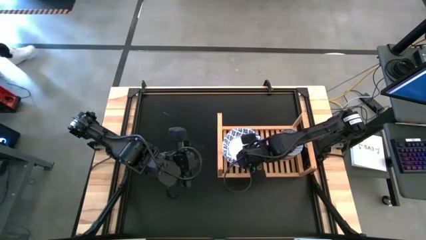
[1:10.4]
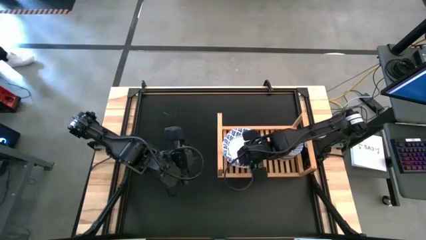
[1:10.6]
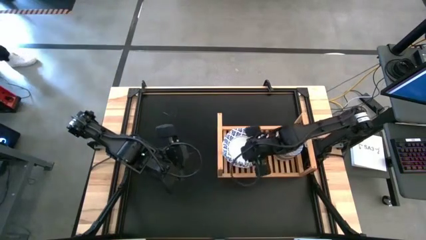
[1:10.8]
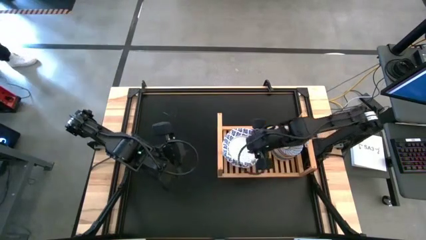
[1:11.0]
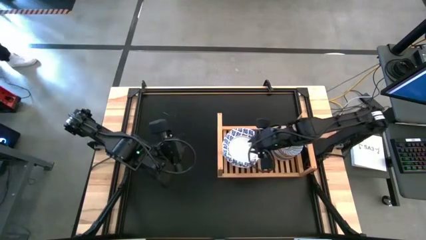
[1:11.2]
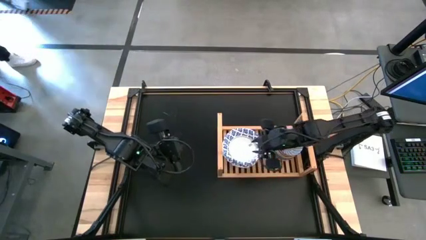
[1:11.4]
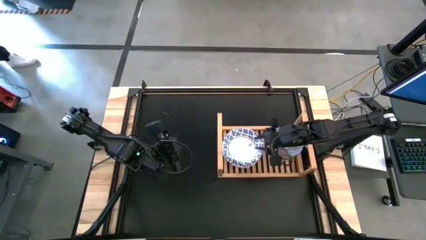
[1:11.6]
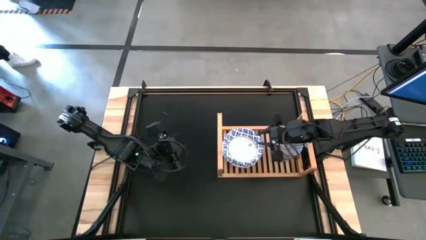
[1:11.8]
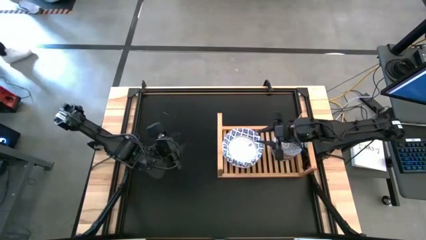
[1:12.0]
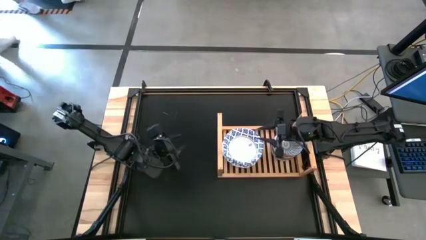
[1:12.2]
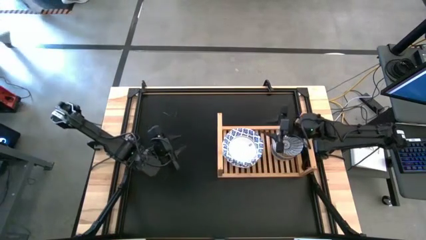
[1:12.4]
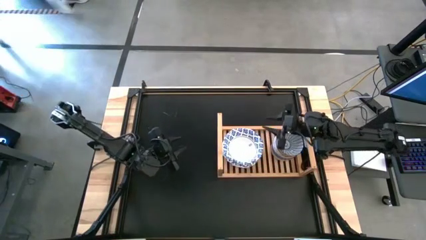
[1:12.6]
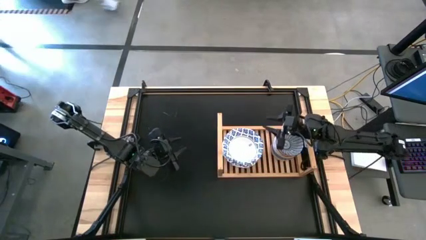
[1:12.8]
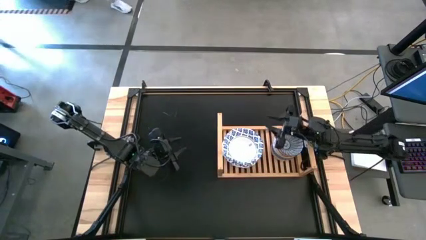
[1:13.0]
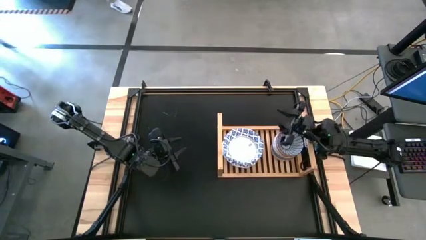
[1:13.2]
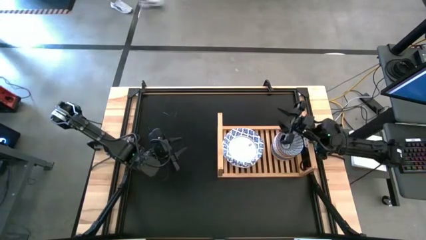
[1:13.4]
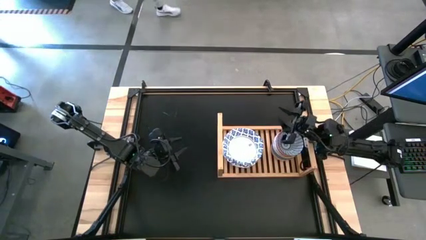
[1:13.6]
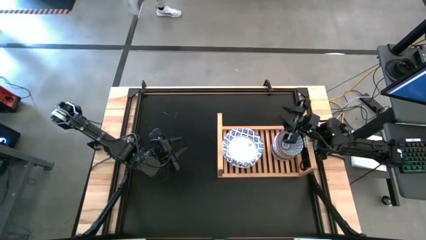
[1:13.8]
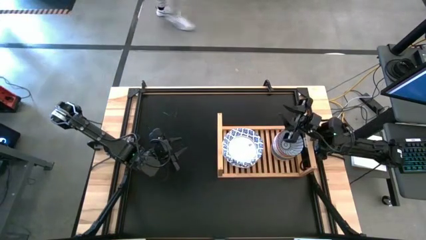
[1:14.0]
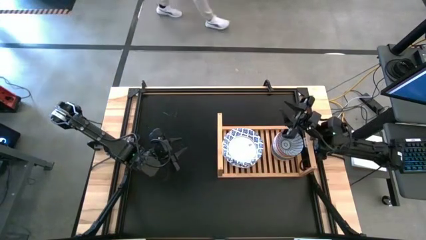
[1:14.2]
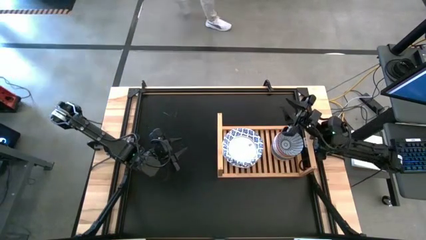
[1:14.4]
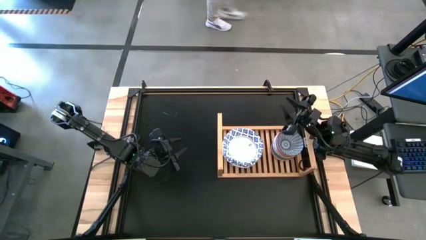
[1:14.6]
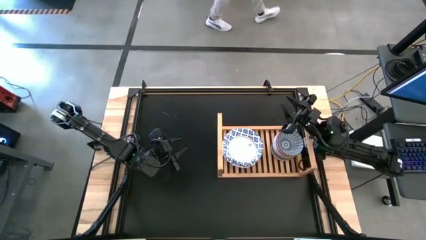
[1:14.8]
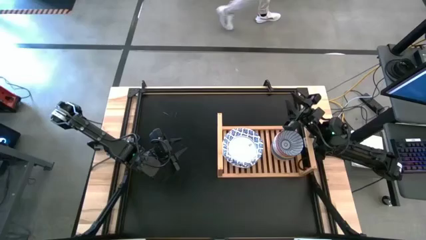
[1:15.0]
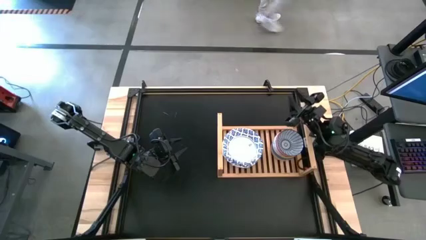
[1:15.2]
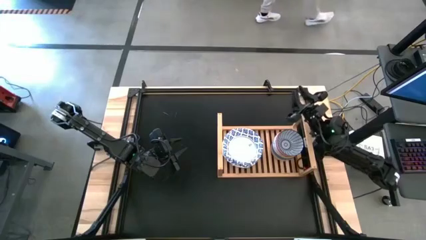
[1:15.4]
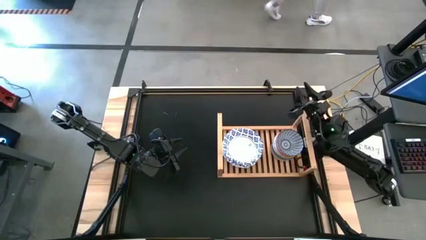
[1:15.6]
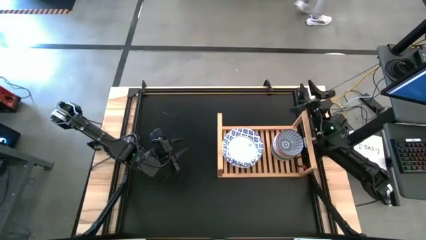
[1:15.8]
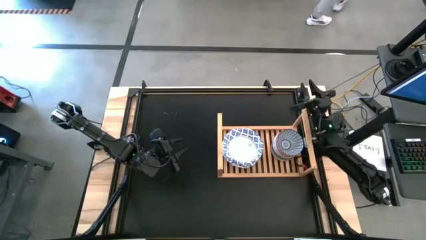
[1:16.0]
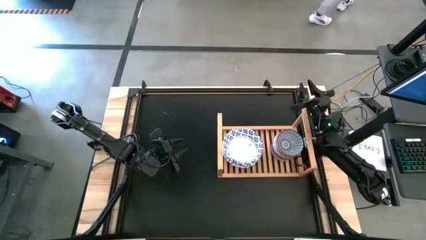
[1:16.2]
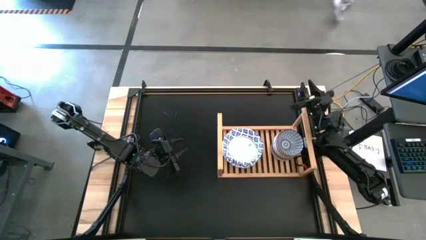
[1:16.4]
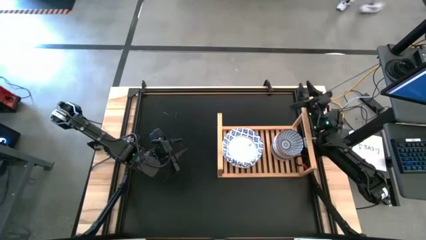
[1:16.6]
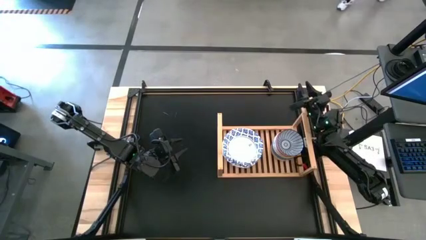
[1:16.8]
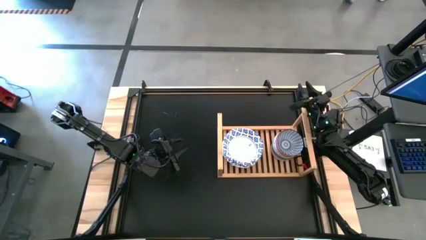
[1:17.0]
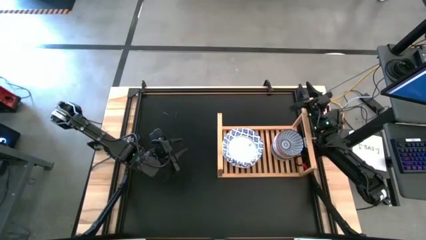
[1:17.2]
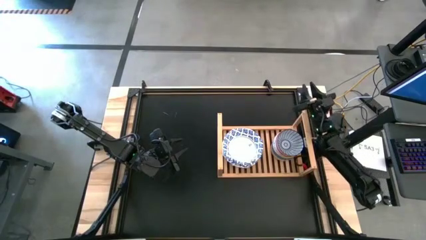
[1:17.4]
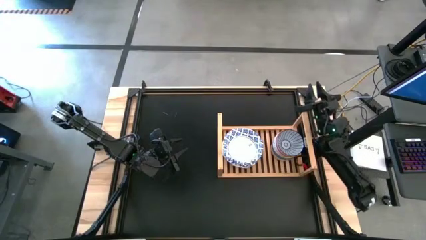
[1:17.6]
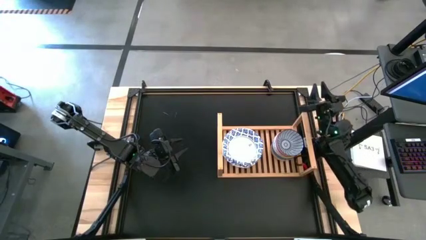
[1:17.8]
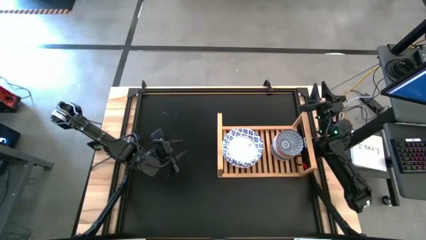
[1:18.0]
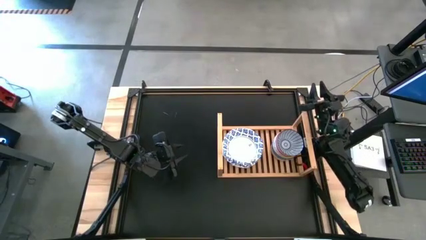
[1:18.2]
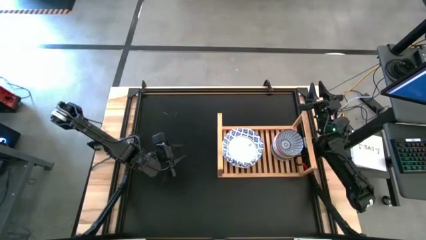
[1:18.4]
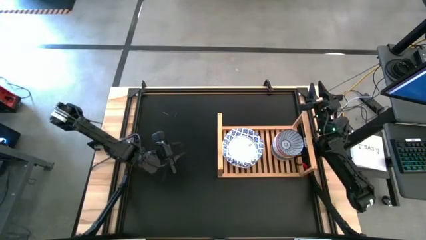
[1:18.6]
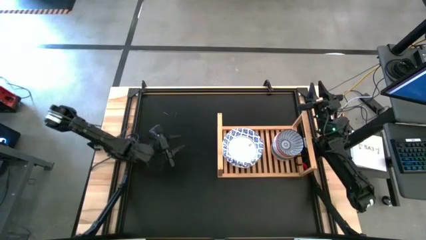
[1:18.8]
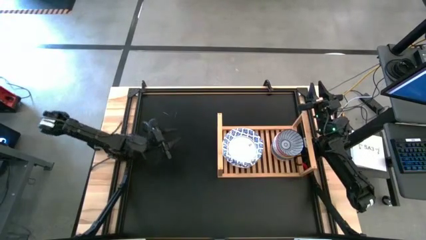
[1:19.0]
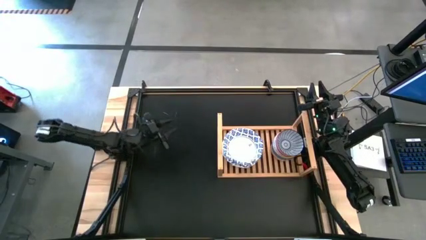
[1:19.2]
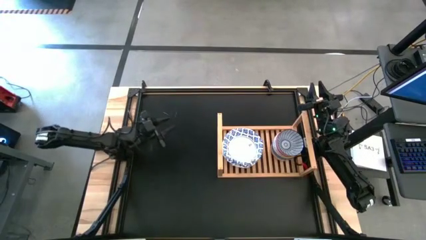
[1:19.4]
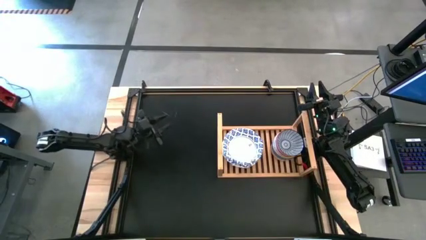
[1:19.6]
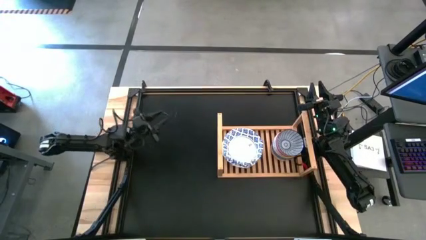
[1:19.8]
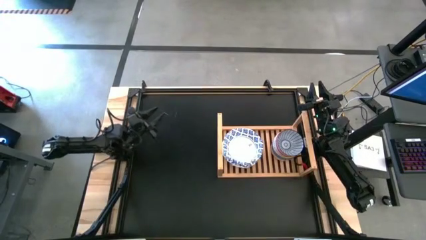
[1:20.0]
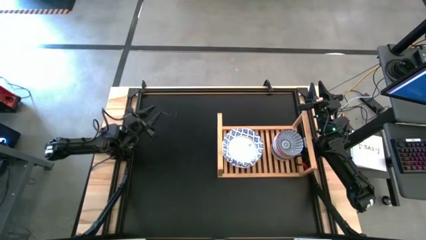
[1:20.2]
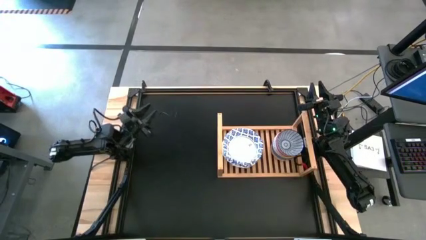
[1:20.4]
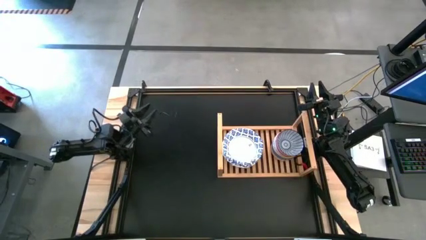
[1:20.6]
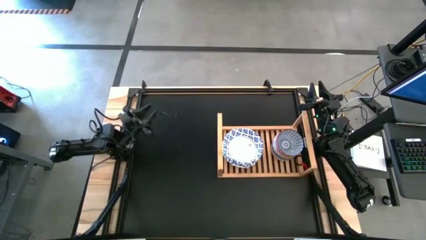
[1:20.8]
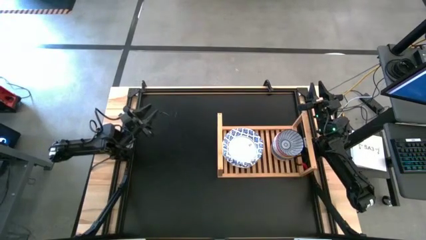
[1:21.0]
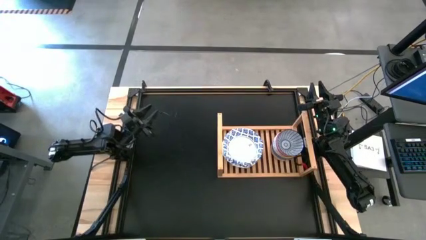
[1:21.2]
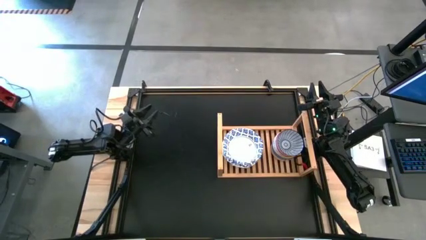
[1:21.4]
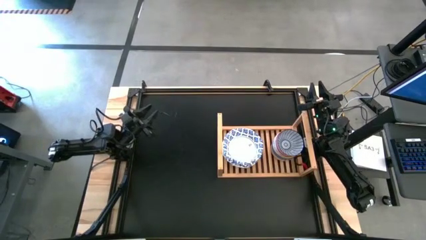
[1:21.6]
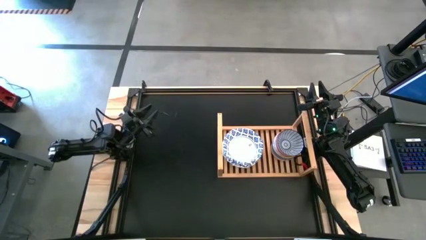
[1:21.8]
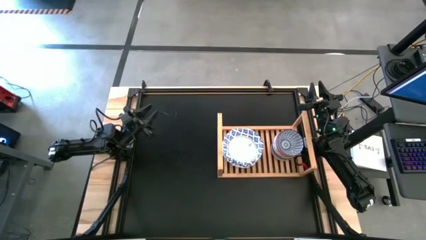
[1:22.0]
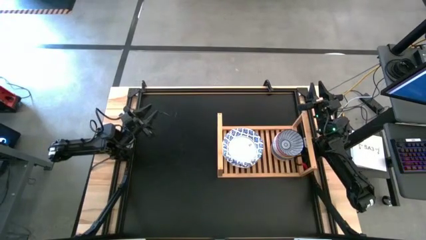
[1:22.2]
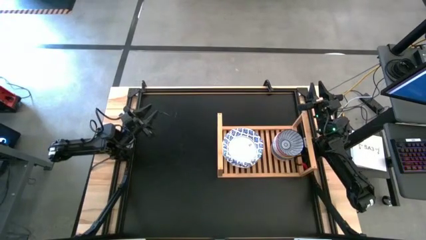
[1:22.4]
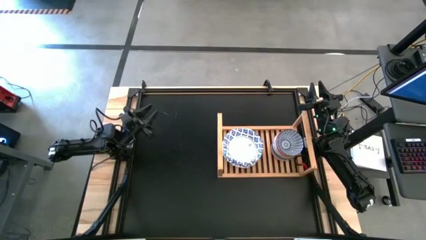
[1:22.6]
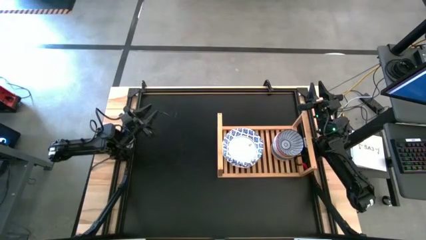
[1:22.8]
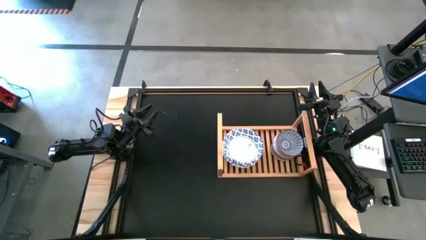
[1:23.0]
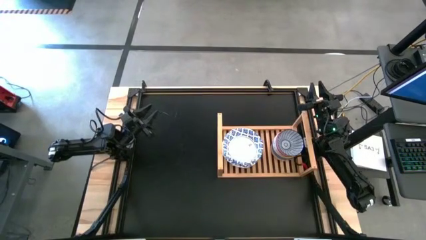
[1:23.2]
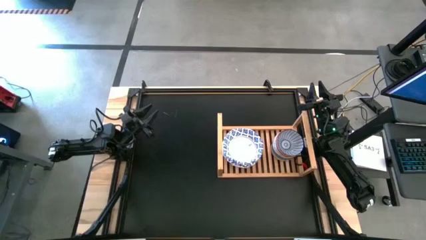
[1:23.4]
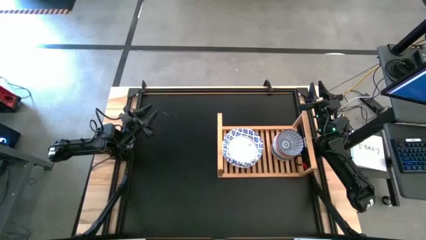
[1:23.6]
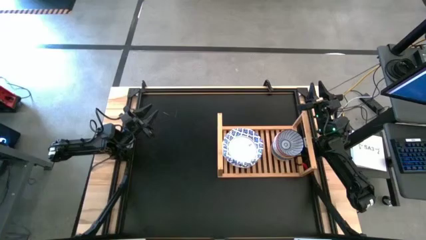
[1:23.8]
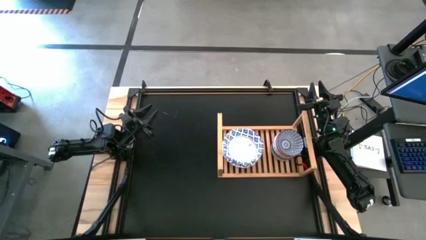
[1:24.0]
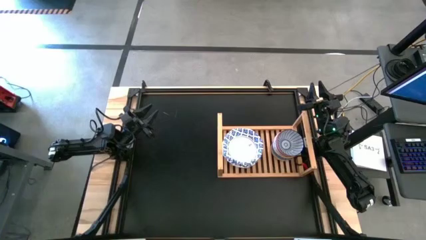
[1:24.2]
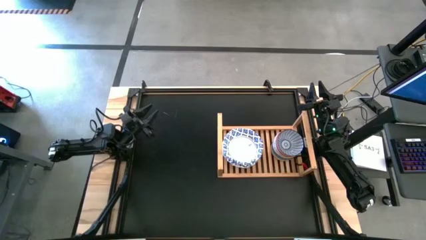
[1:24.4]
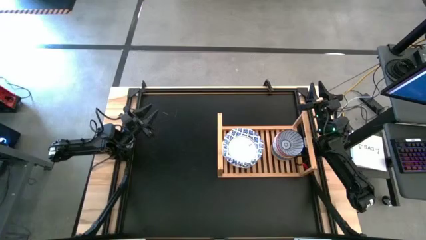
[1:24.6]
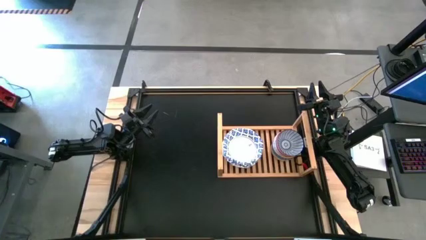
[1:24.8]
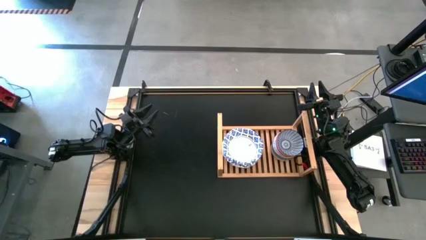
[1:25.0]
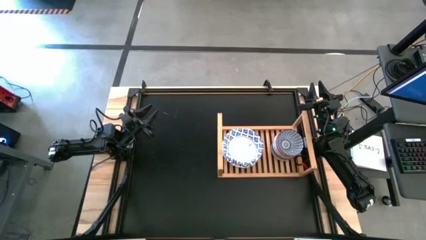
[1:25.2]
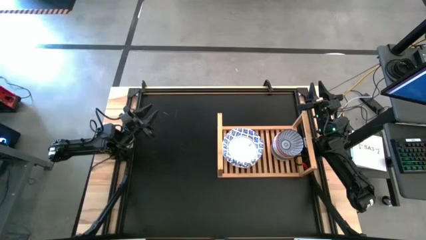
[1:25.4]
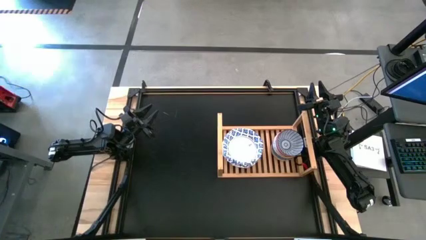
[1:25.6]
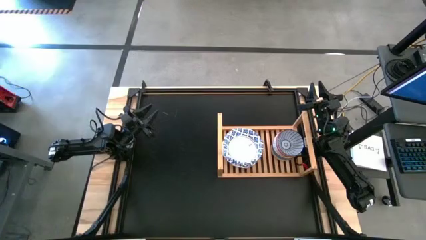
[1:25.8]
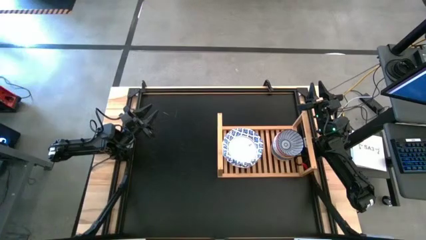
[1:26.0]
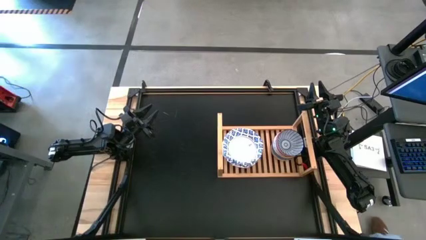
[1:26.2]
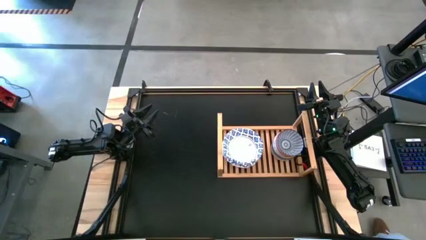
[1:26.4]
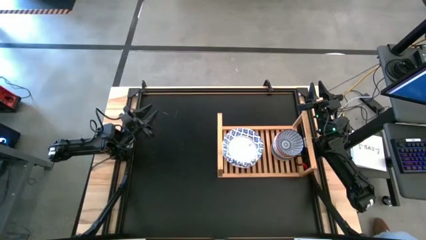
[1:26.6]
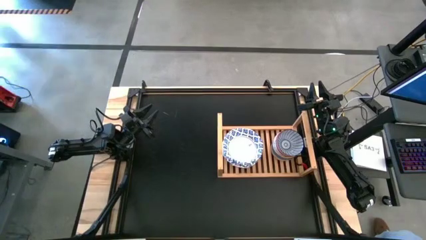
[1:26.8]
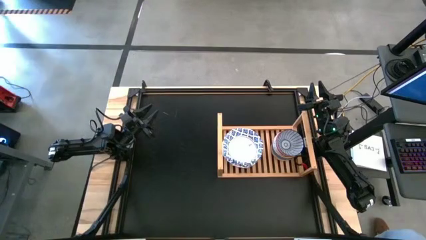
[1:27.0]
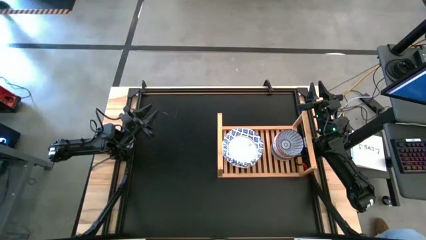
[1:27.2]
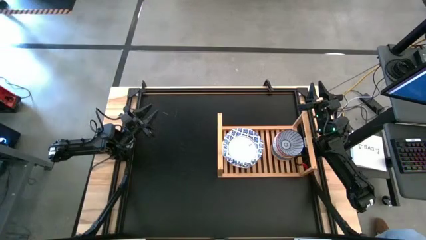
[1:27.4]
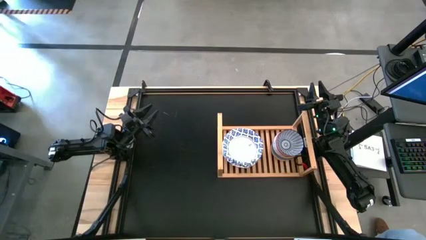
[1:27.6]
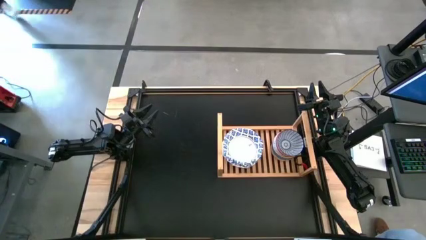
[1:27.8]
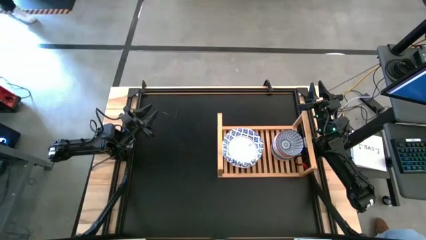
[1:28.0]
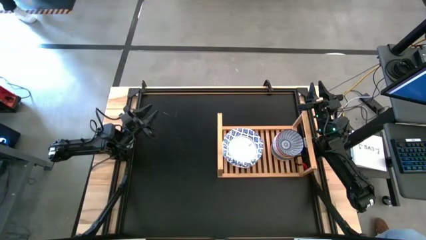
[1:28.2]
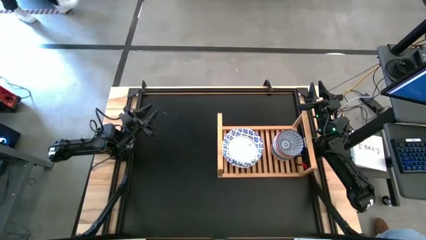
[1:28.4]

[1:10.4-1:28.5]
Task: Place and stack bowls onto a shelf
Return to Home Position

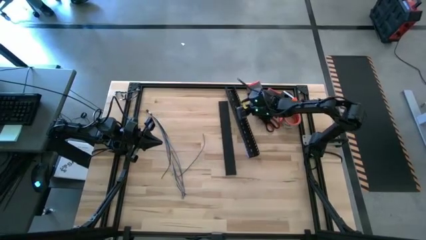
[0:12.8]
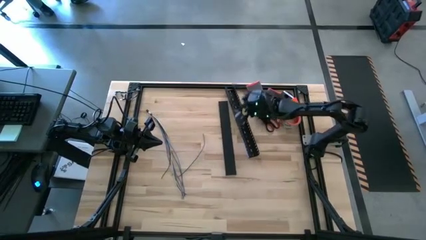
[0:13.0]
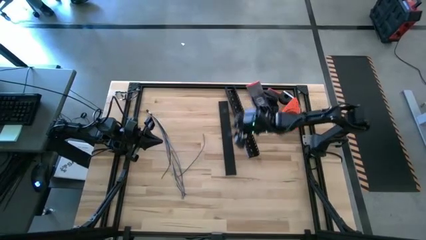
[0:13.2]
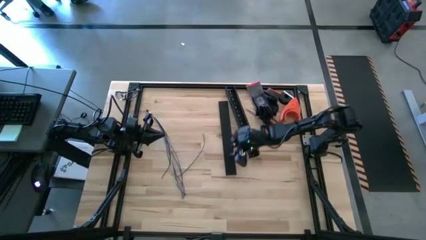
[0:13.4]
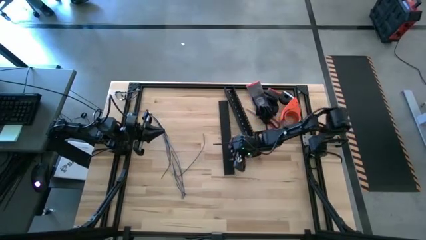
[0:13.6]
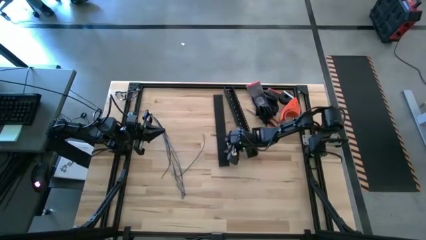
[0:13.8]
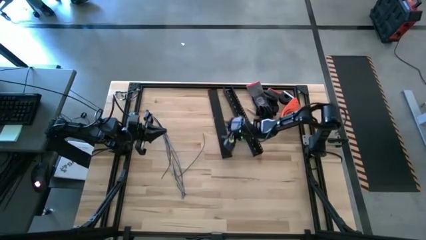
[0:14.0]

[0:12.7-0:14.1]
Task: Ziptie cables
Adjust the cable duct cover
